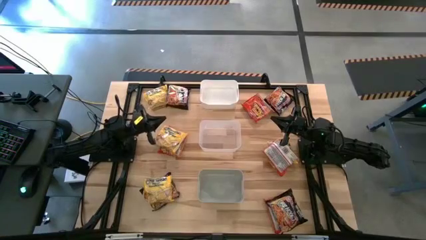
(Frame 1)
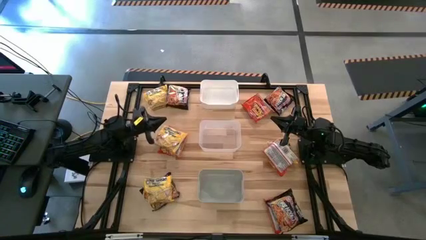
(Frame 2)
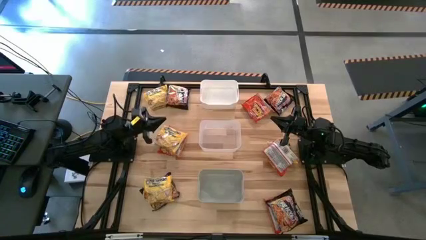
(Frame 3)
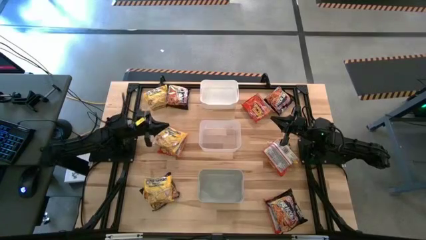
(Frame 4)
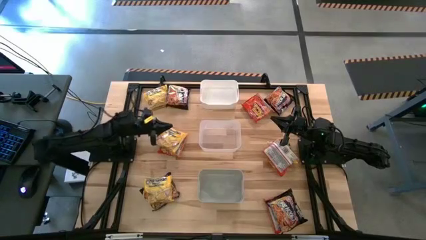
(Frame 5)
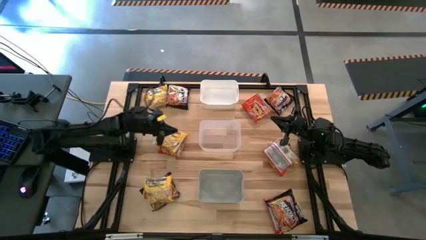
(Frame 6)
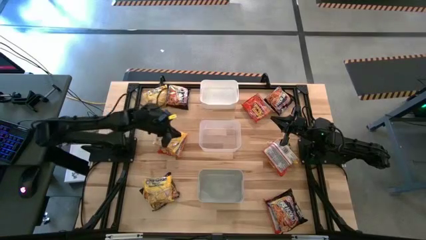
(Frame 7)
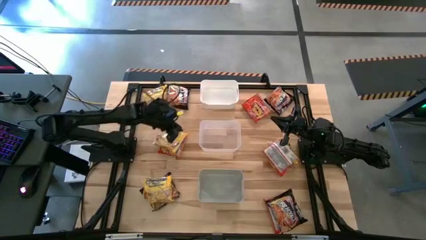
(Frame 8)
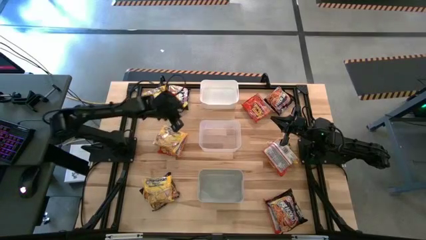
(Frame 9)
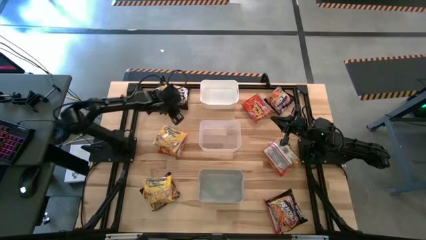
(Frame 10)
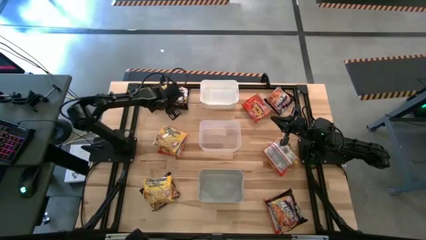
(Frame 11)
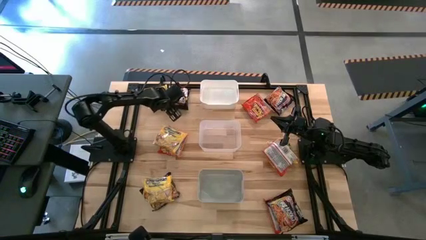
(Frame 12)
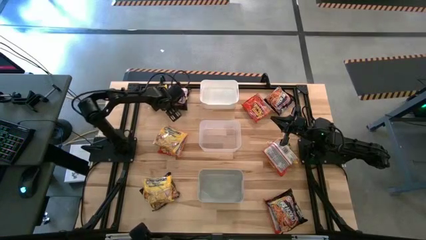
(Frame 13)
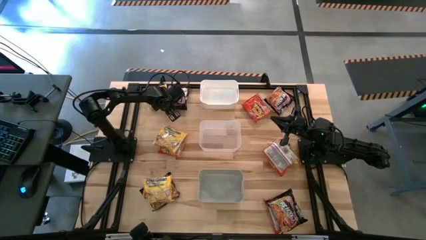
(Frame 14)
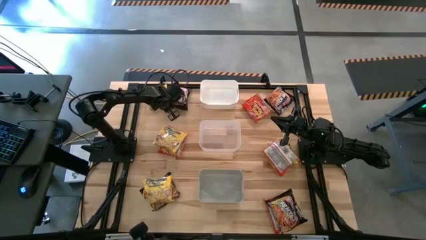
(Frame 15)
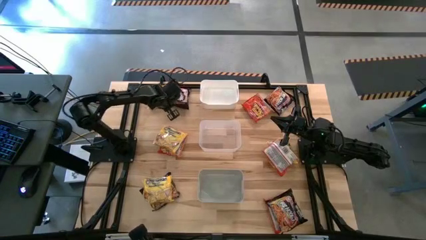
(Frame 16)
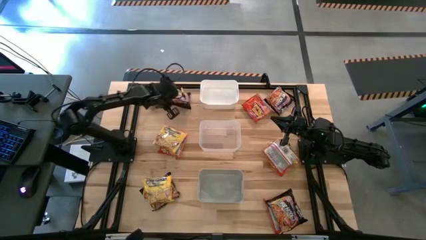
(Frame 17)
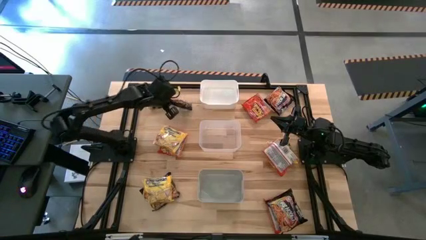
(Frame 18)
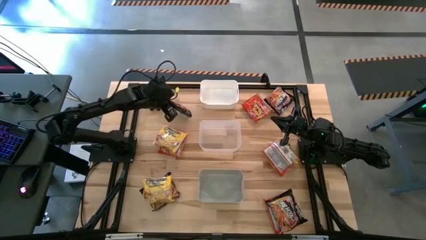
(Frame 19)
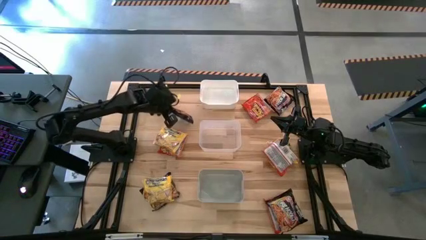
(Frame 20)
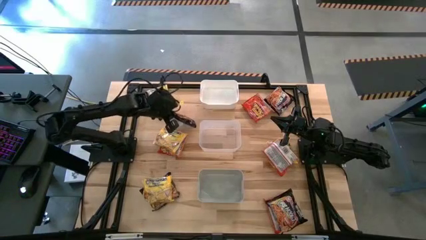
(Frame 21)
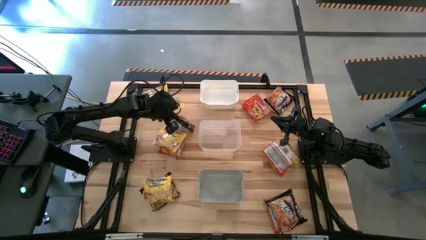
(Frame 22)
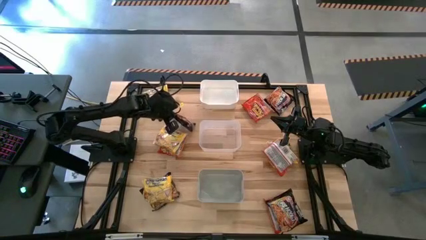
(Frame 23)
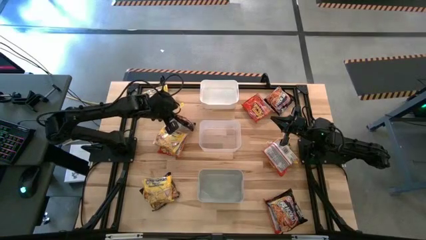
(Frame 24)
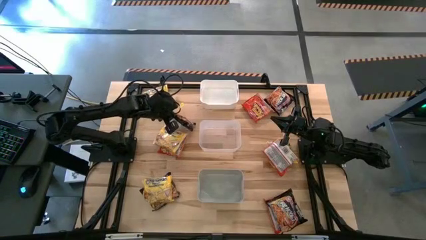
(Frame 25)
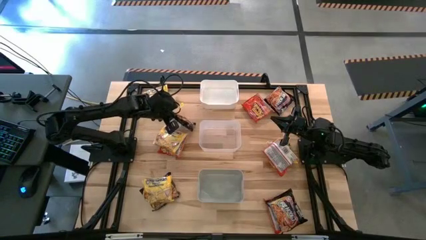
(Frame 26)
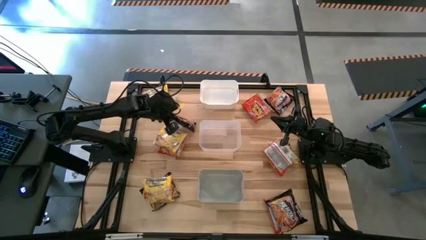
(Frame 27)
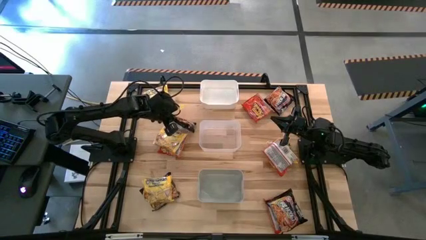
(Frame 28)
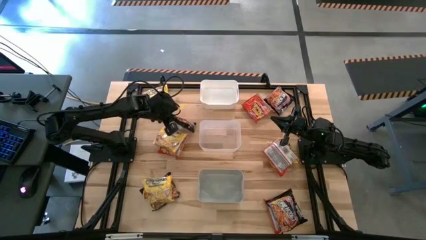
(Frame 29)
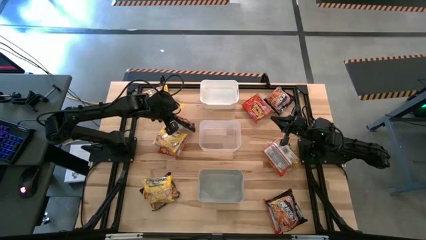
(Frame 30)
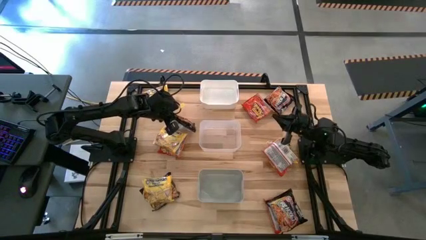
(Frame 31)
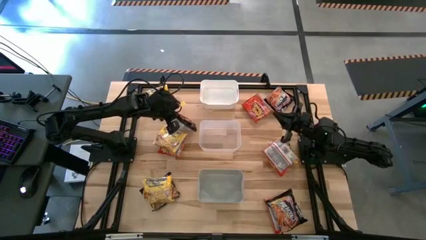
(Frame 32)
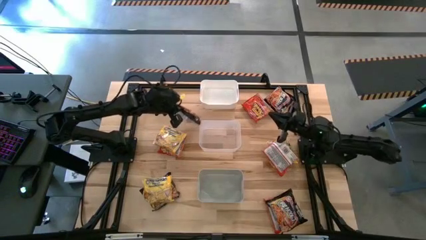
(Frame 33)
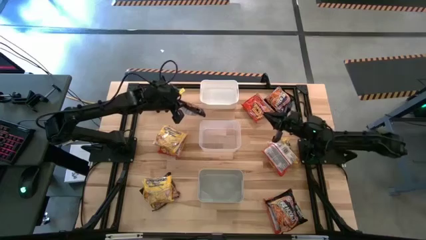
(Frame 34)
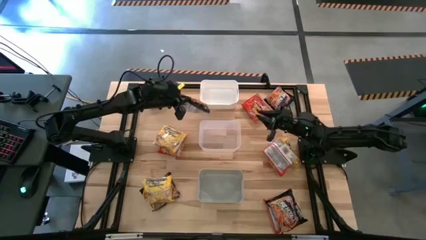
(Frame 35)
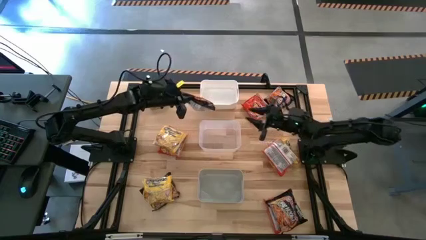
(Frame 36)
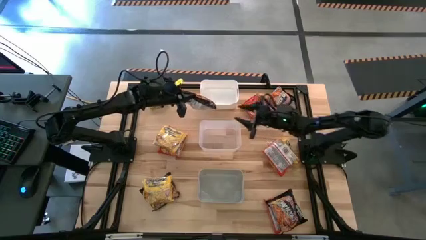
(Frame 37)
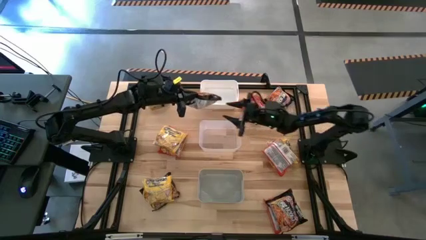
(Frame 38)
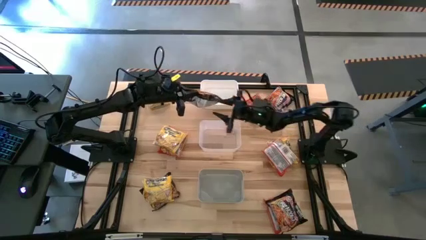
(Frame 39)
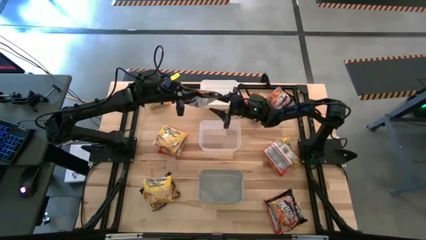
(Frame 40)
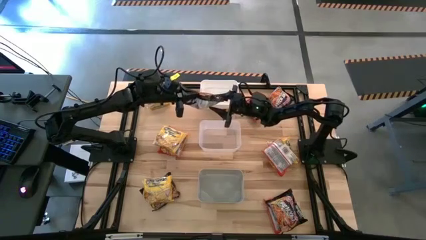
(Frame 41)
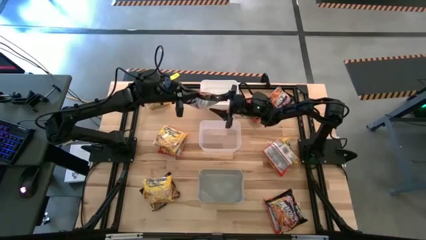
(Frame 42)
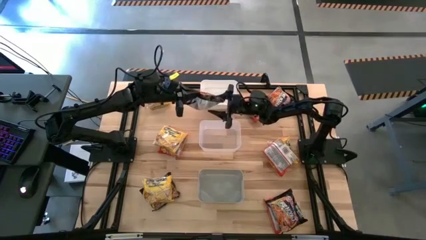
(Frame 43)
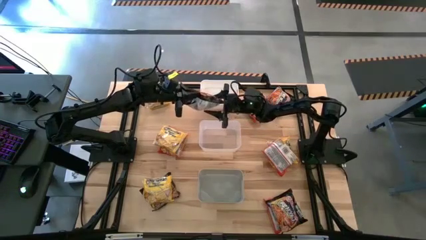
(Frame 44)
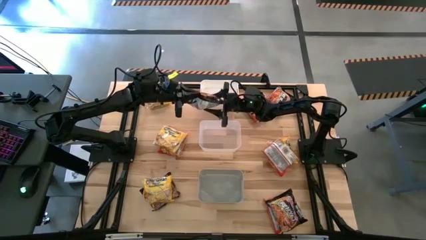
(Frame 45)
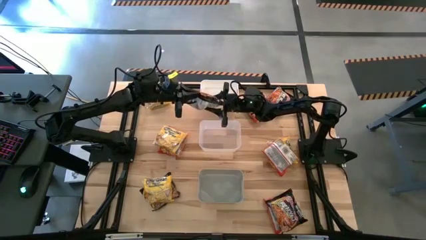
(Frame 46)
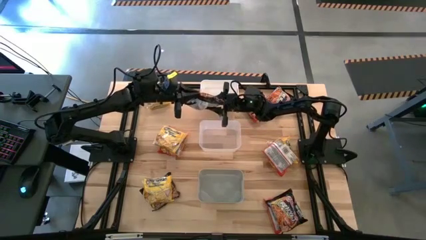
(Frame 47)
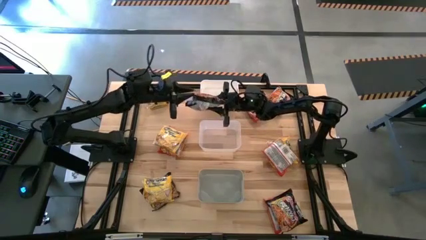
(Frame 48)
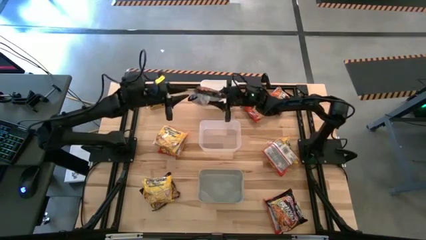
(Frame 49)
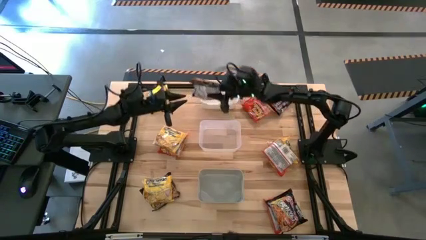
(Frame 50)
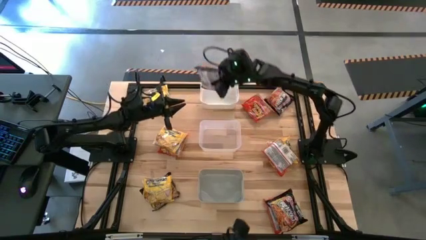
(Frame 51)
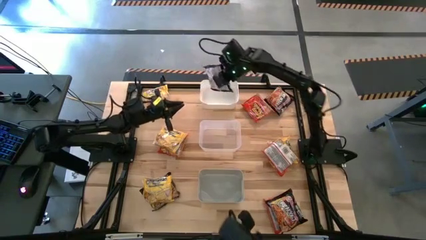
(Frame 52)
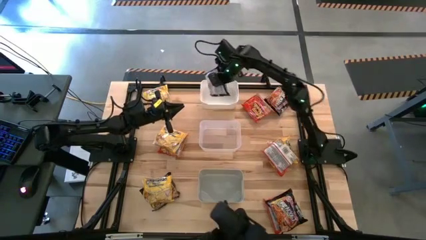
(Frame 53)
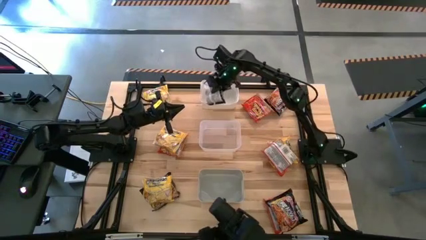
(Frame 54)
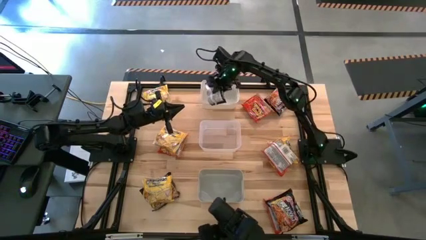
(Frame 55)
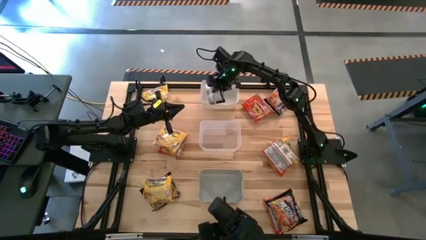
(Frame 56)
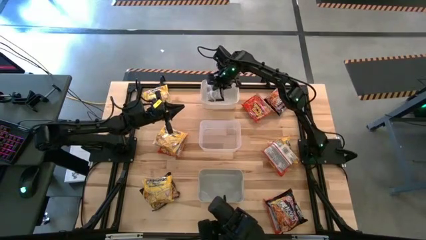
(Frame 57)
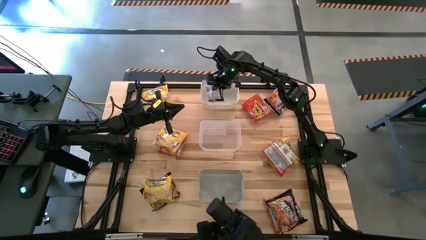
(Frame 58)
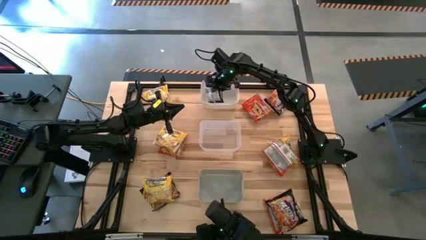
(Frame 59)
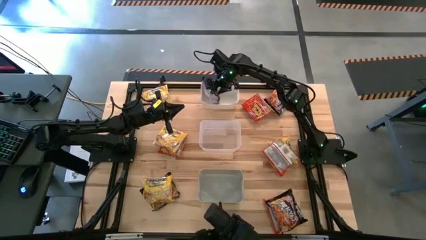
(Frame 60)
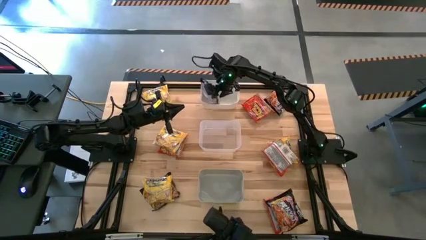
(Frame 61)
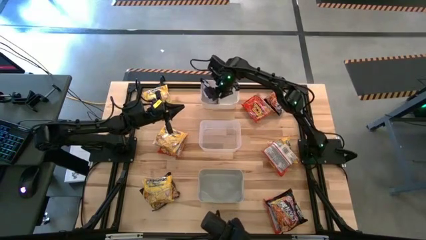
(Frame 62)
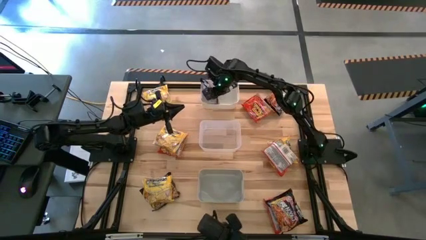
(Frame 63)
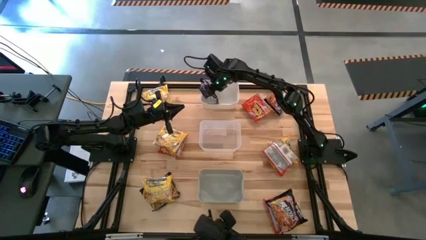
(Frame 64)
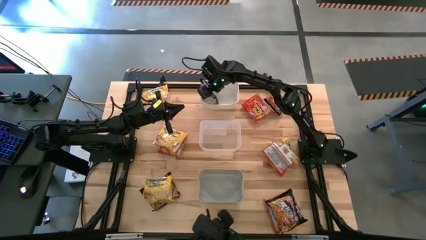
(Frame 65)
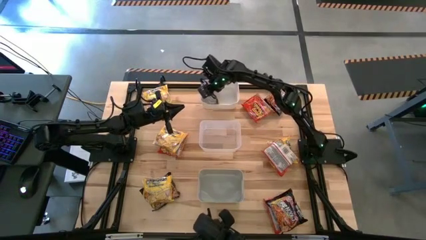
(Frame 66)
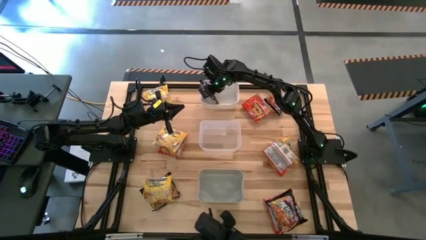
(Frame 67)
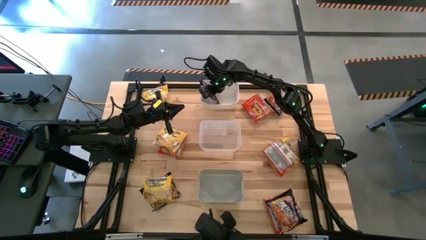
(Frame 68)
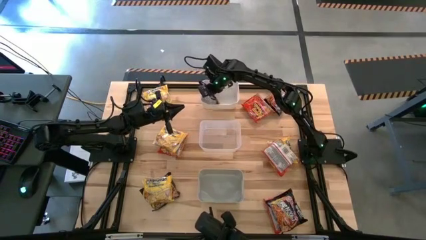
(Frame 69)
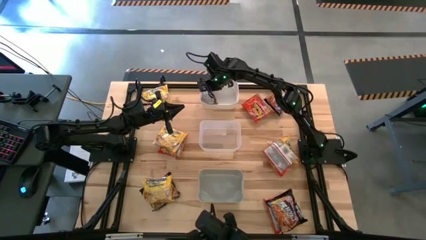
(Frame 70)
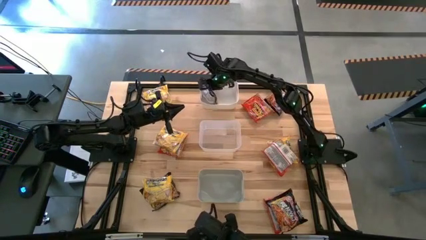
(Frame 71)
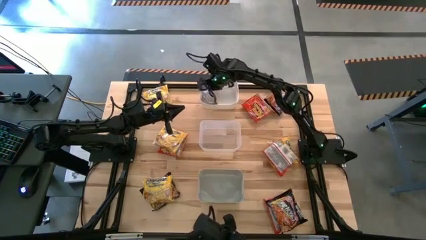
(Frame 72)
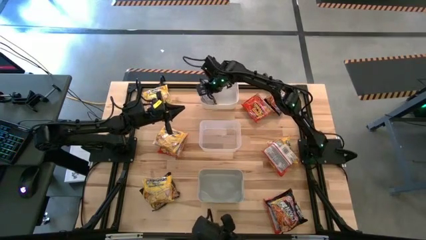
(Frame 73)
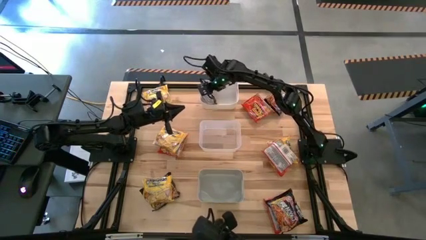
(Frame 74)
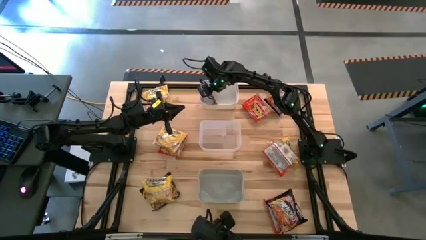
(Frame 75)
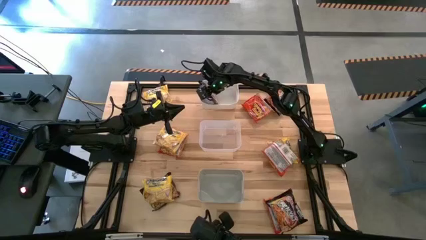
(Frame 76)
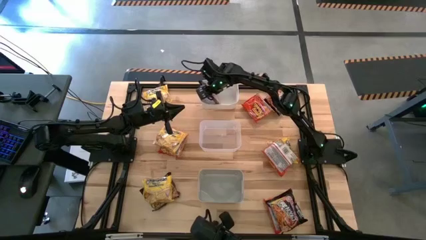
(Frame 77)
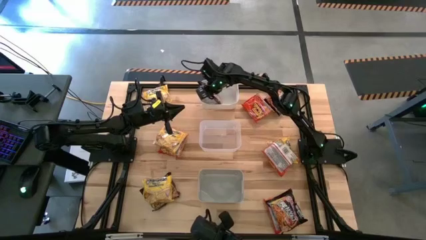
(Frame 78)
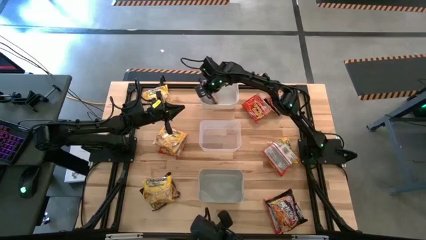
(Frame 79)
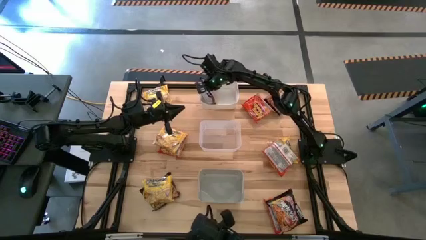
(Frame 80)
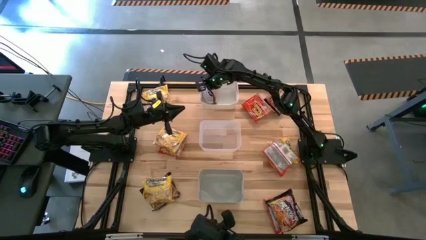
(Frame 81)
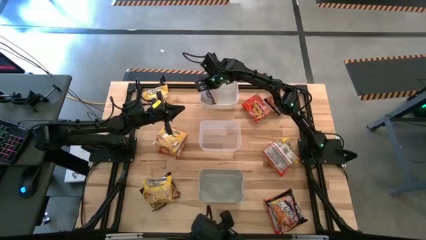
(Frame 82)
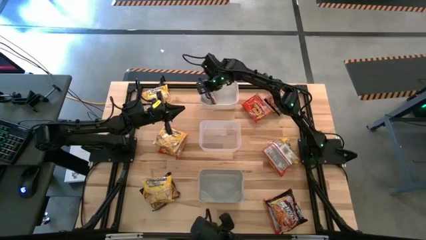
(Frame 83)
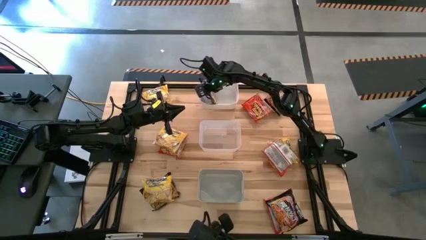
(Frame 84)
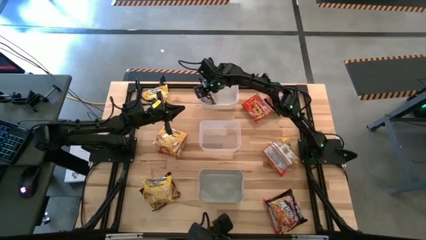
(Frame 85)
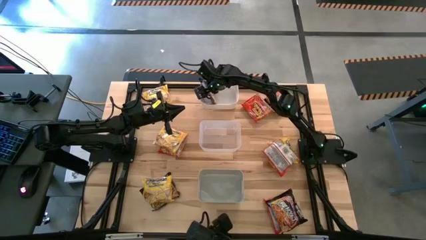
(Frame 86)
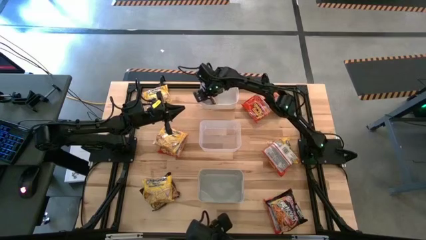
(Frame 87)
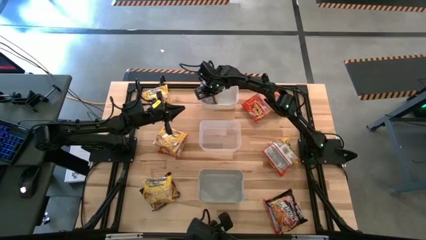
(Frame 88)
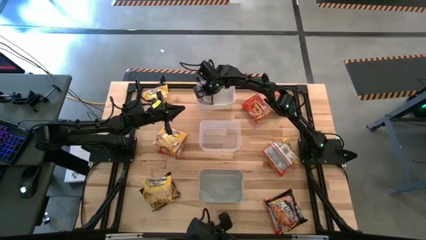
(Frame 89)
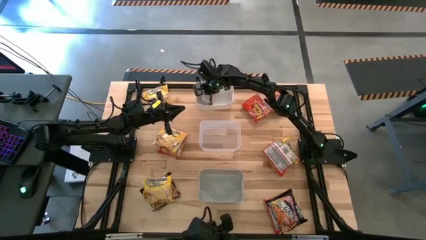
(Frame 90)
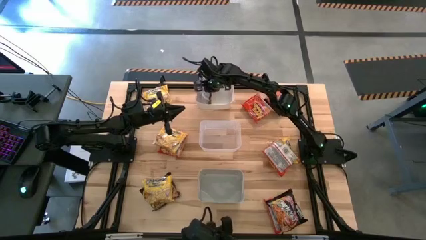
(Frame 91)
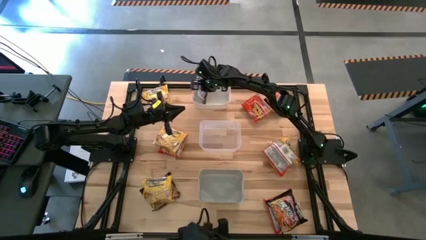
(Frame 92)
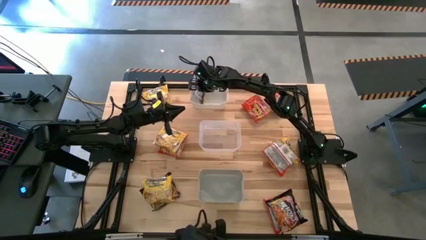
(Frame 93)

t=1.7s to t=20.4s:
Task: Sort Maruchan noodles
Put the black noodle pack into the white bin
